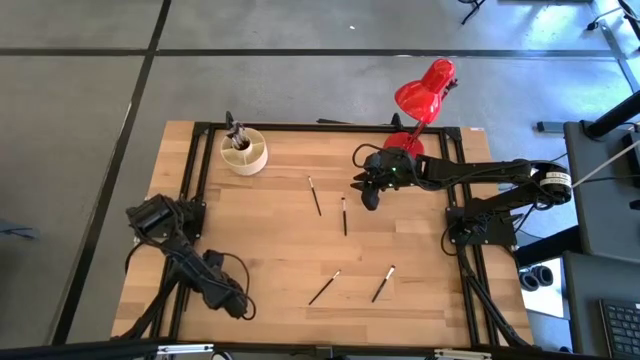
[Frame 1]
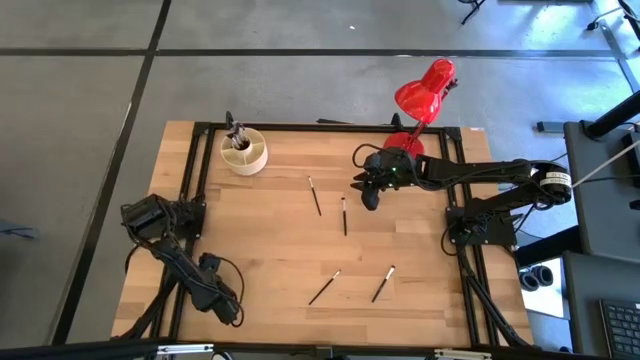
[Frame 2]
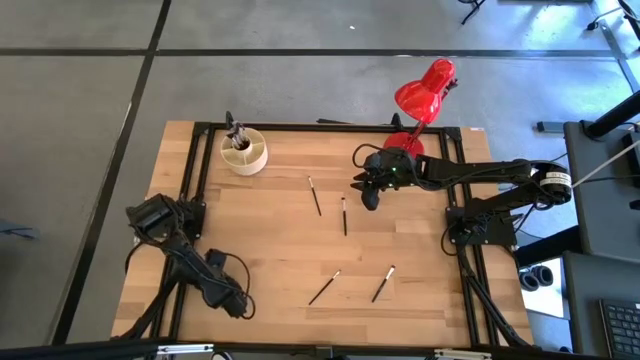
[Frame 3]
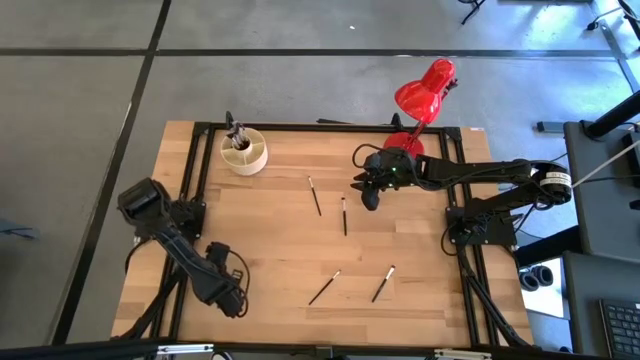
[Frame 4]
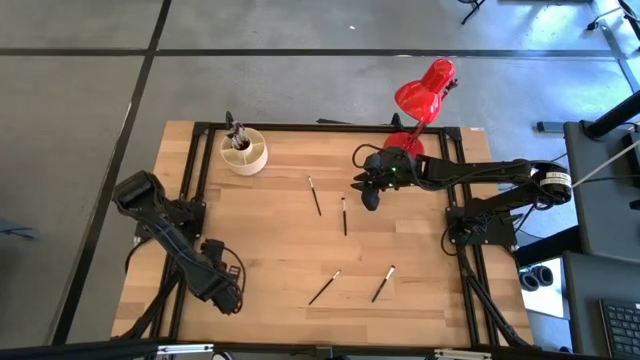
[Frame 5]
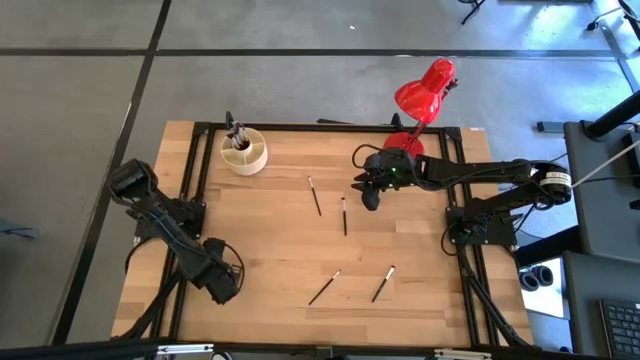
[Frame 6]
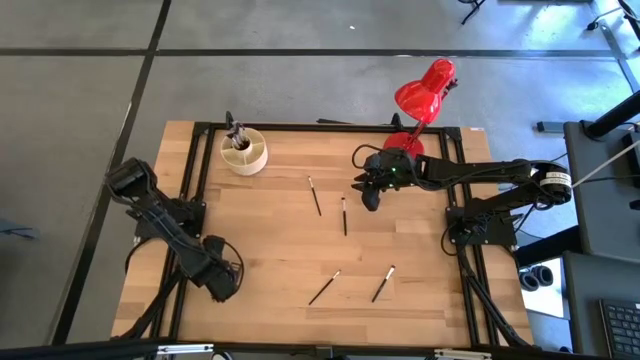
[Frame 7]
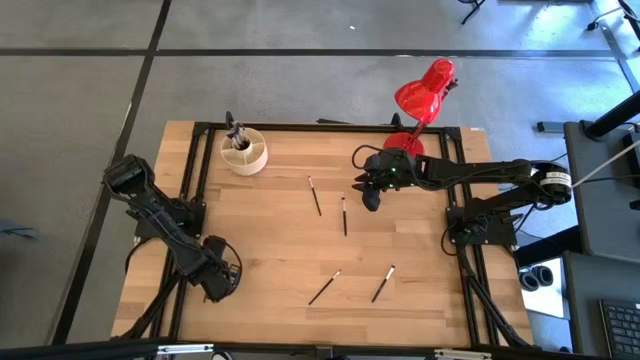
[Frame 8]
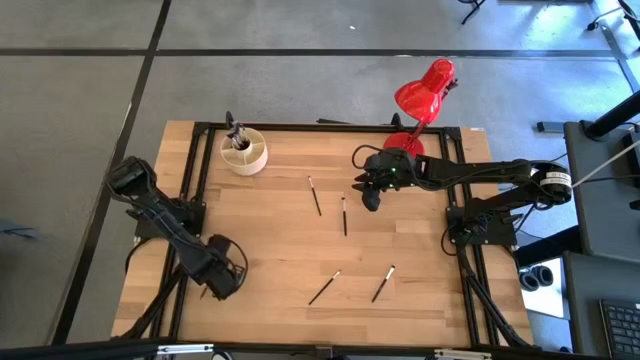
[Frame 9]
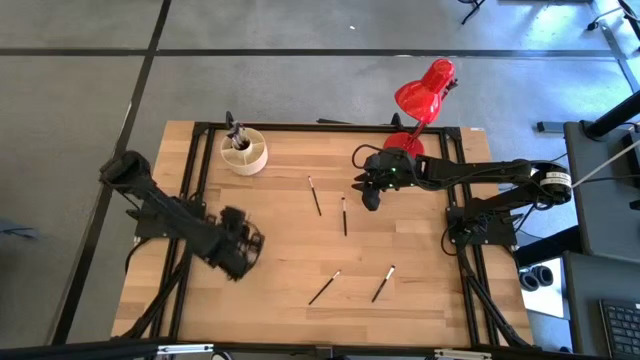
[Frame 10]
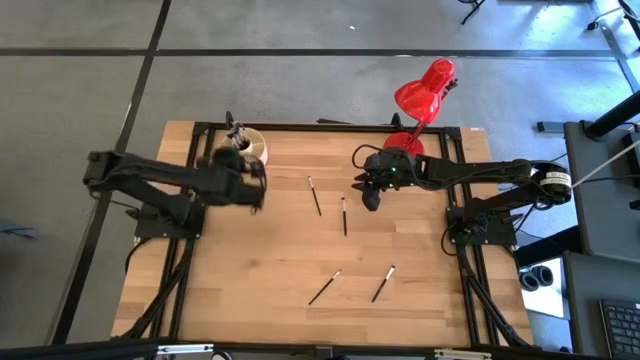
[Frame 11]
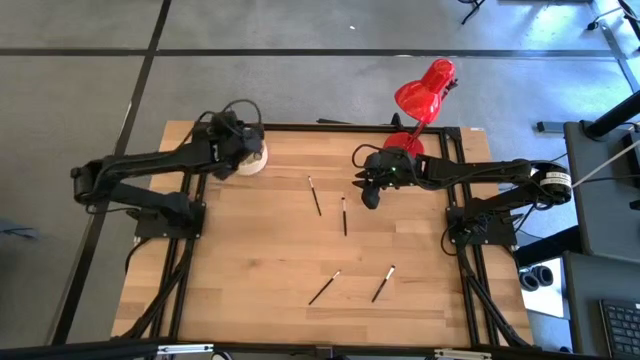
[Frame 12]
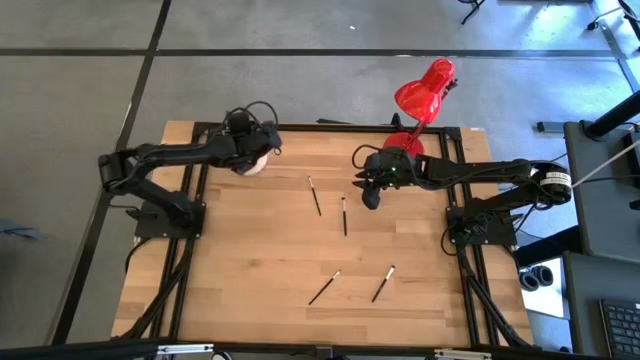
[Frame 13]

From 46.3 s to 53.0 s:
Task: Put items in baskets/containers
Put the black eyeshadow brush into the white organizer

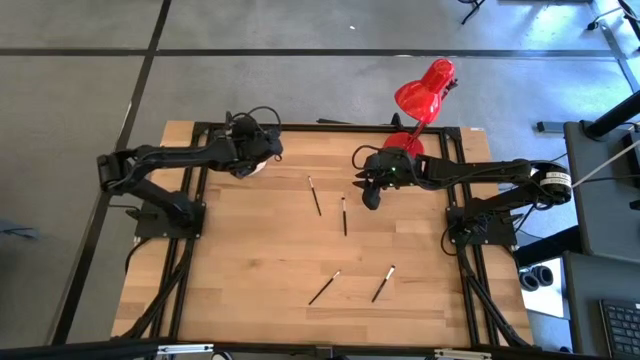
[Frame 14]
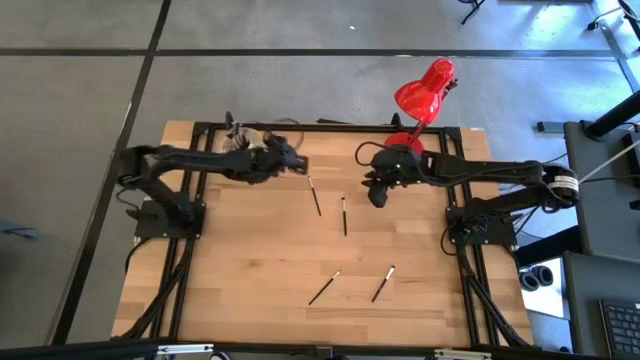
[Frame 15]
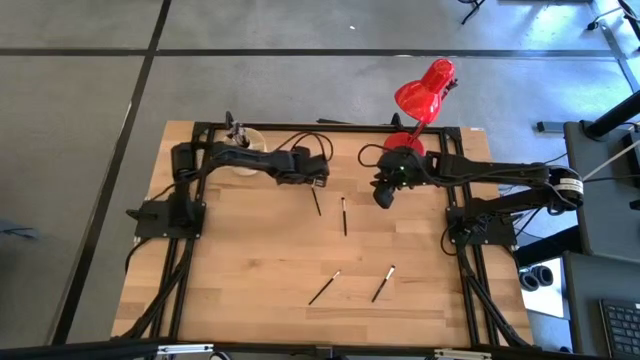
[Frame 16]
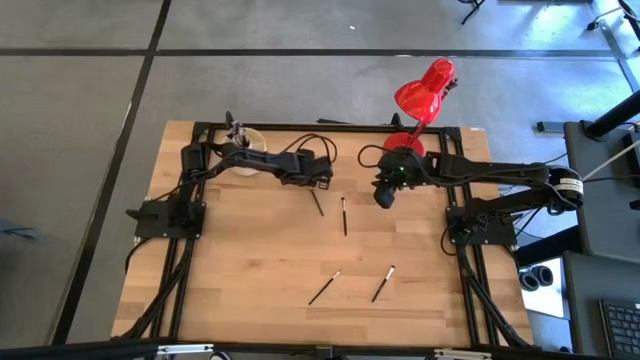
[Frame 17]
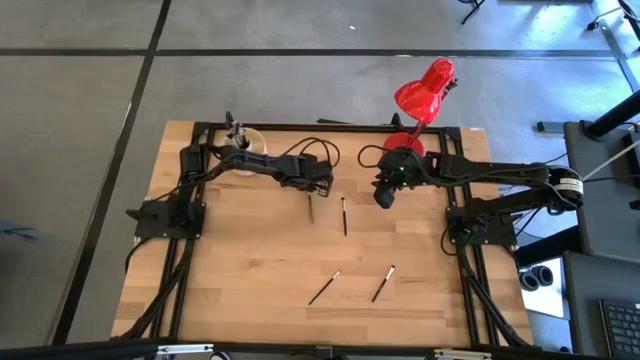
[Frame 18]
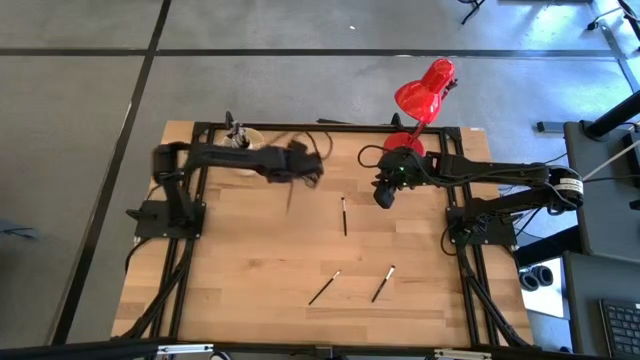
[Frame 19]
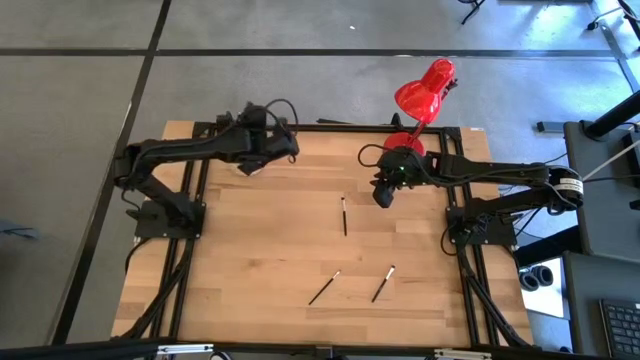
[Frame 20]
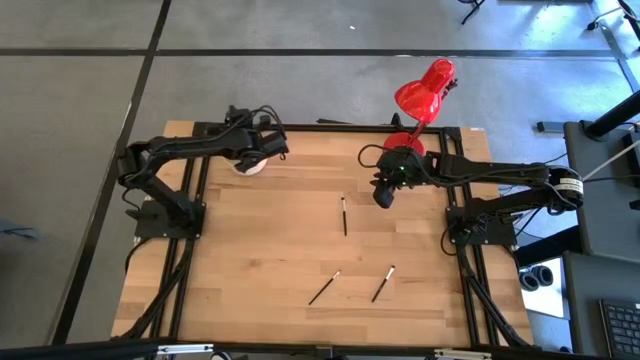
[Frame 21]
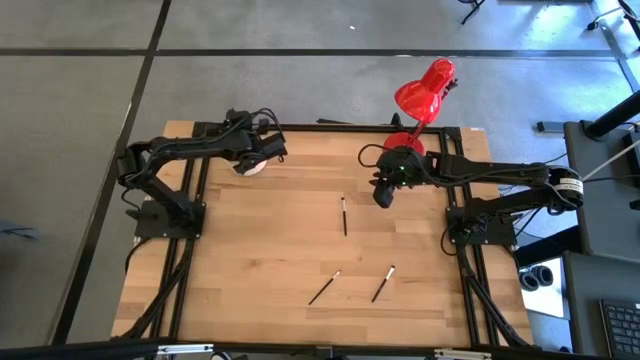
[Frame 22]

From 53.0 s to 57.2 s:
Put the black eyeshadow brush into the white organizer

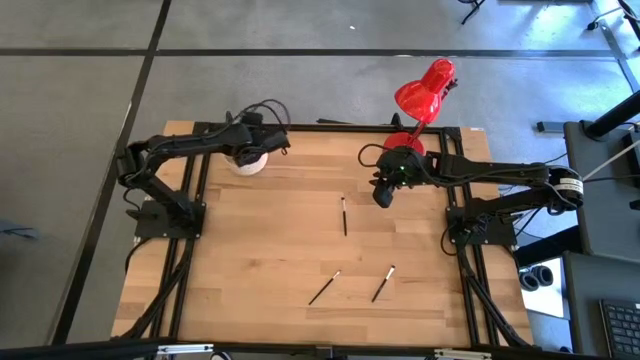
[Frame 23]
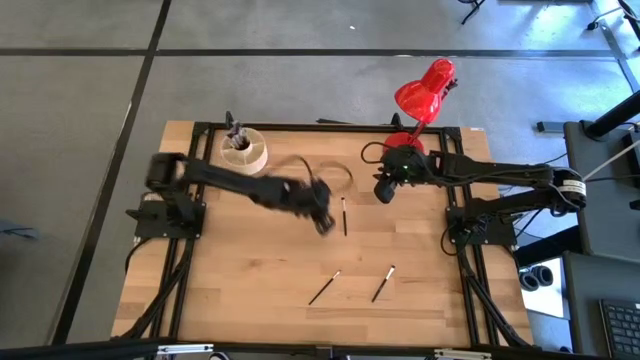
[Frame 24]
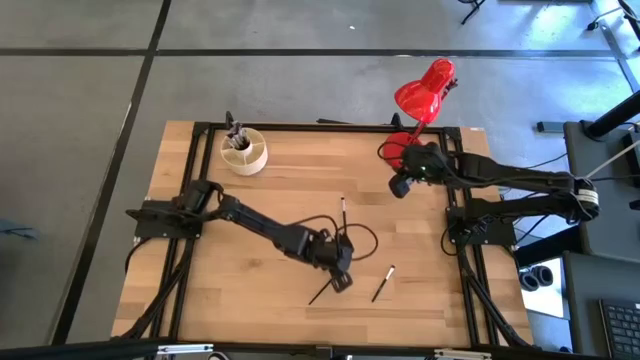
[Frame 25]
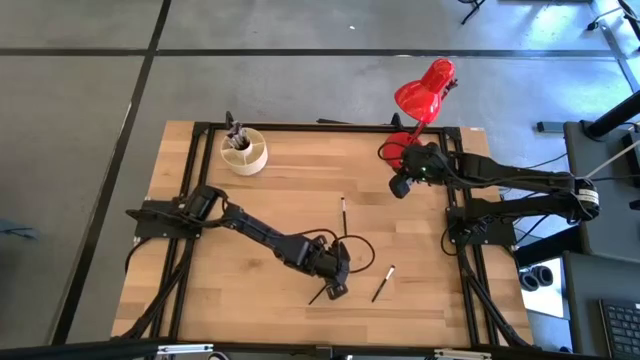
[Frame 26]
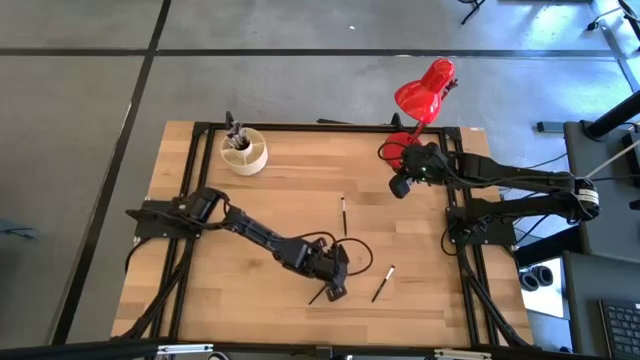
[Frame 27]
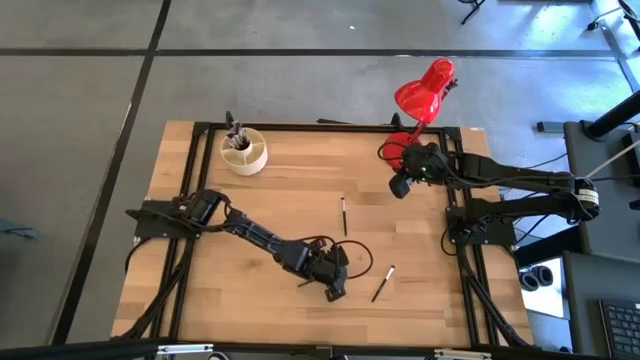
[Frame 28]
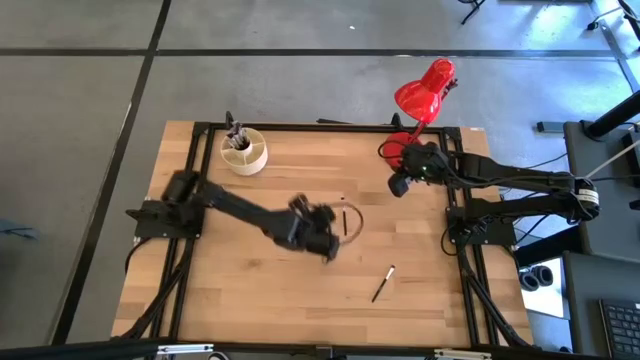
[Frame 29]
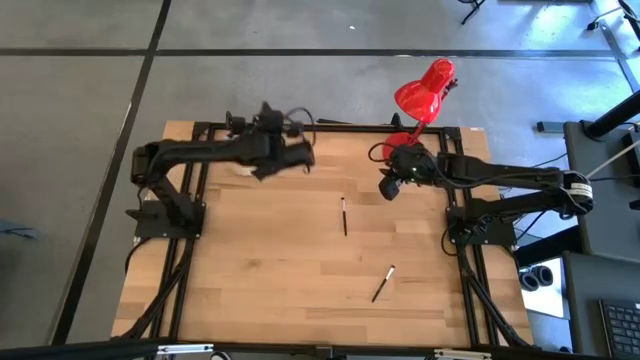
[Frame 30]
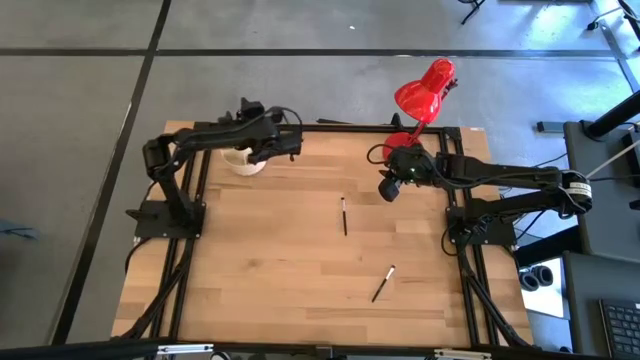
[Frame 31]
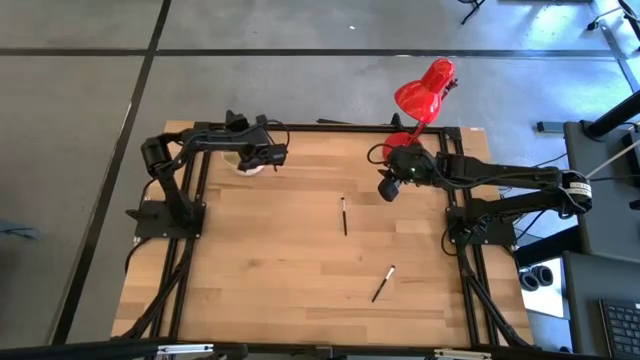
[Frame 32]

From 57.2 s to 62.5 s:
Put the black eyeshadow brush into the white organizer

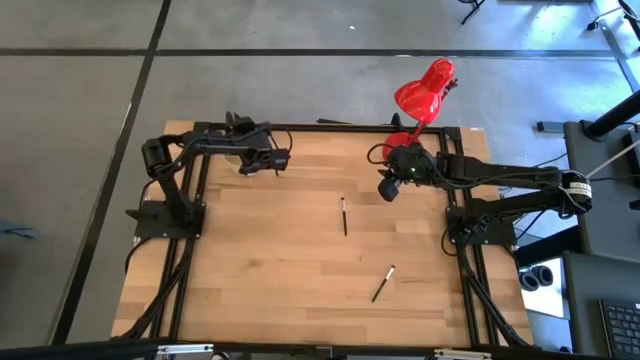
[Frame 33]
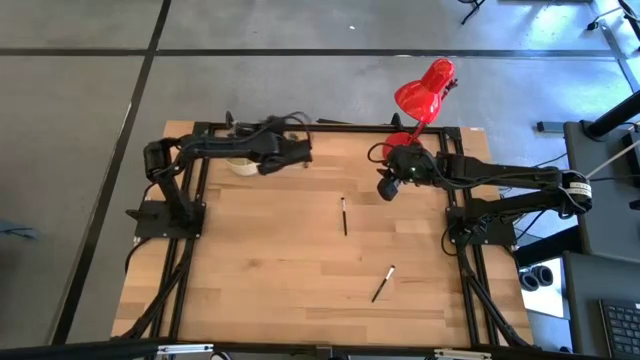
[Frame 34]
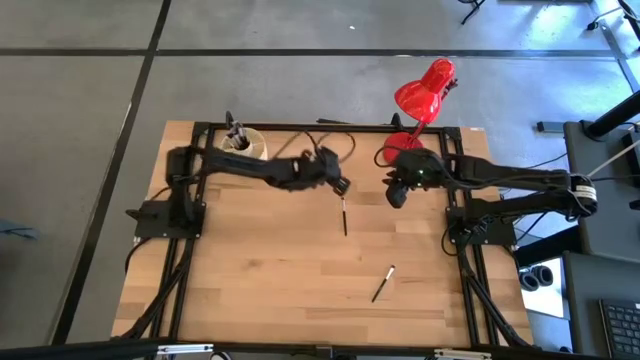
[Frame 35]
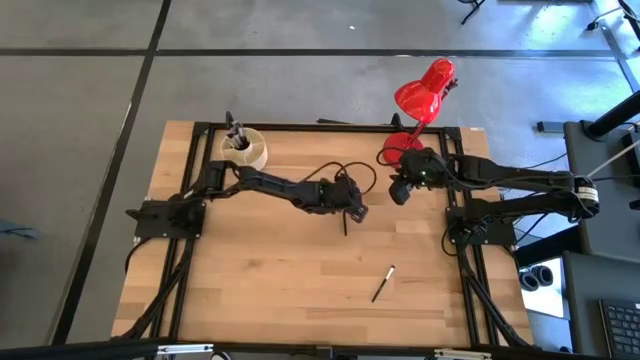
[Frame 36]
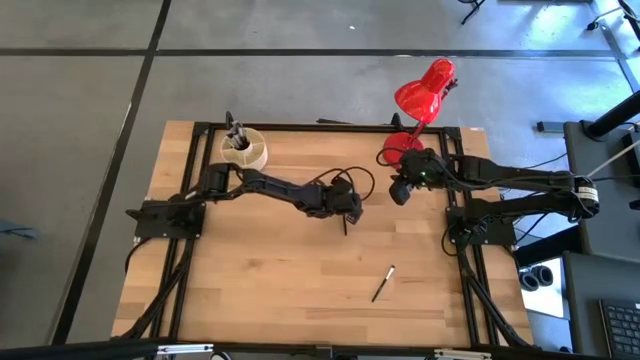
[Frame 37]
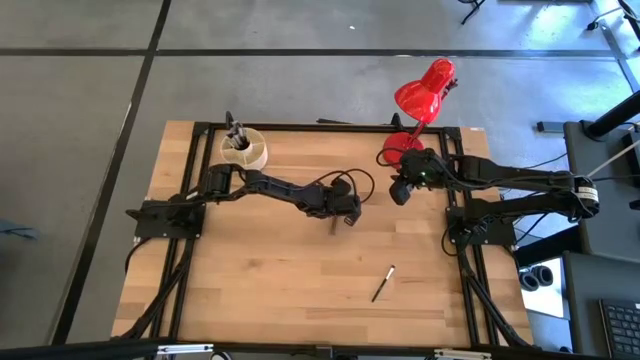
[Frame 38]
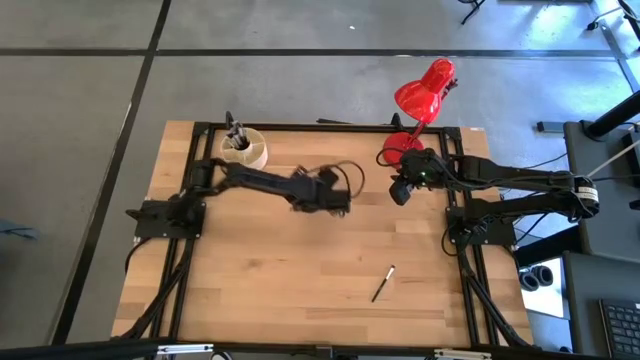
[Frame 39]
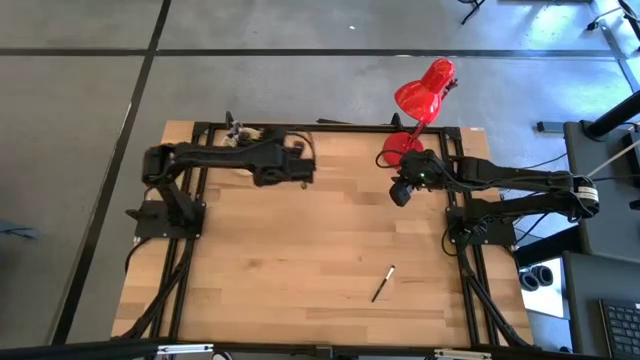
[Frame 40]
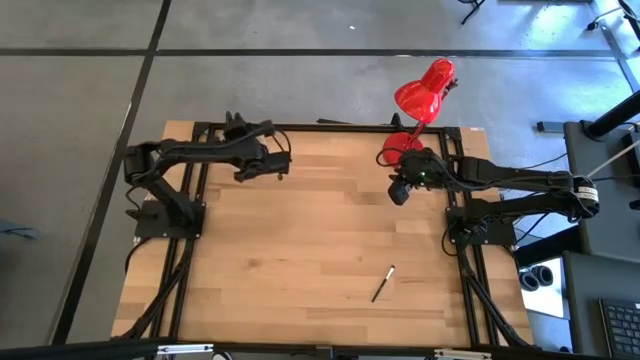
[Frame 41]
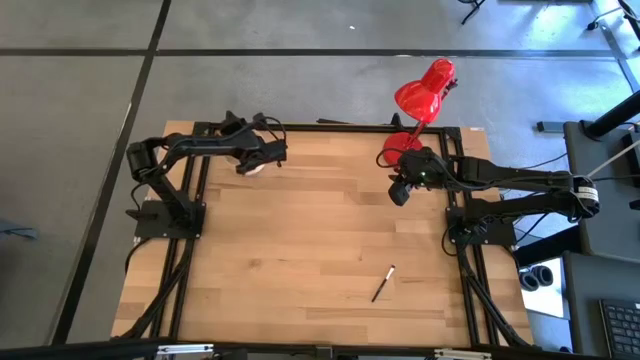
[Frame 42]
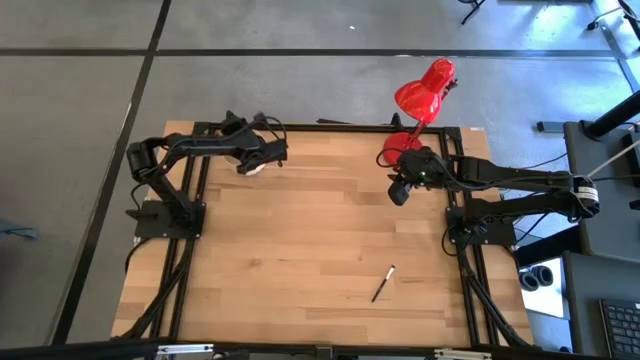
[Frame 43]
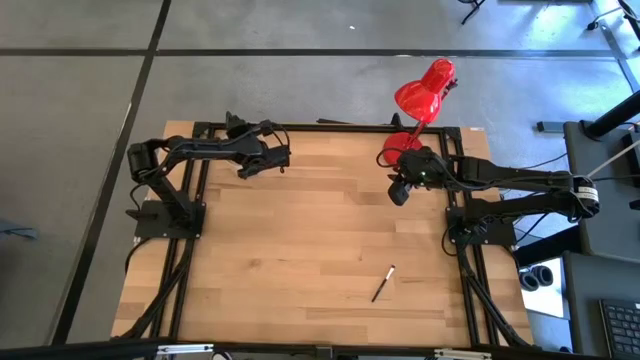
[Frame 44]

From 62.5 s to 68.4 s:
Put the black eyeshadow brush into the white organizer
